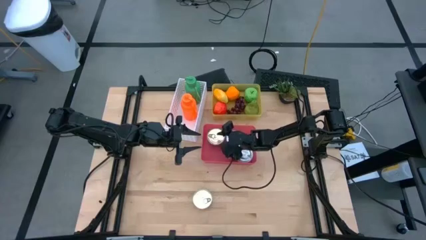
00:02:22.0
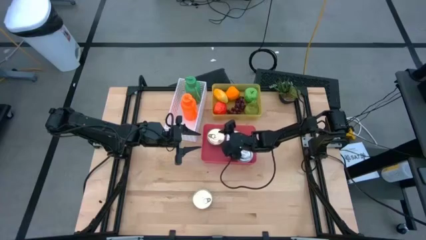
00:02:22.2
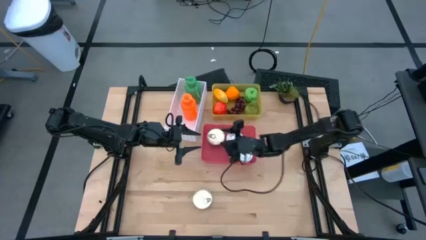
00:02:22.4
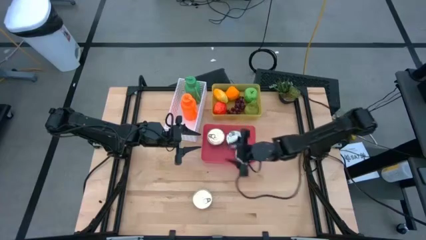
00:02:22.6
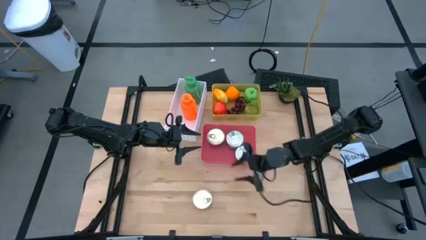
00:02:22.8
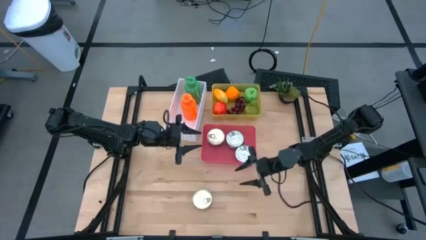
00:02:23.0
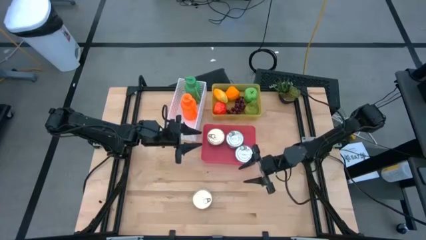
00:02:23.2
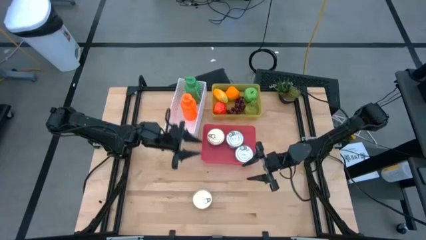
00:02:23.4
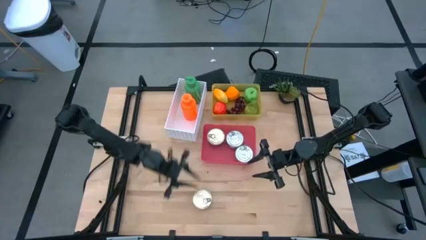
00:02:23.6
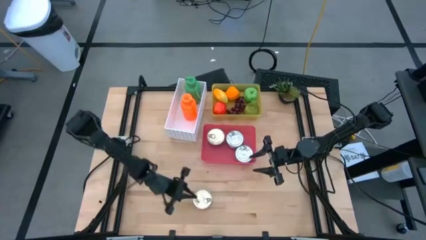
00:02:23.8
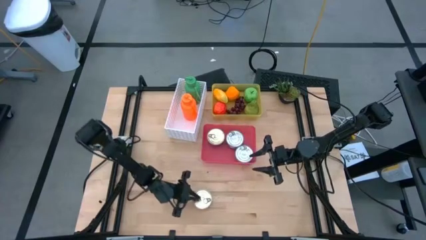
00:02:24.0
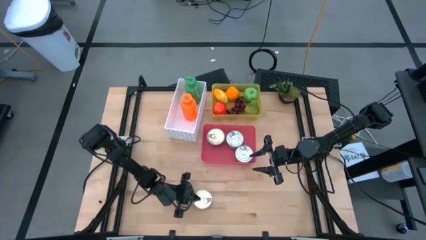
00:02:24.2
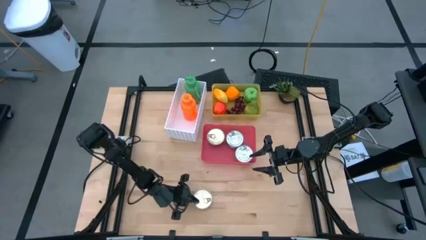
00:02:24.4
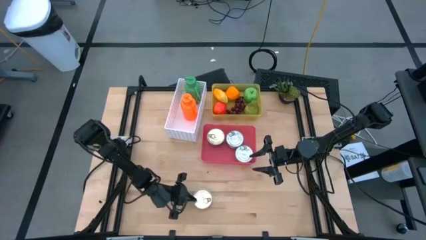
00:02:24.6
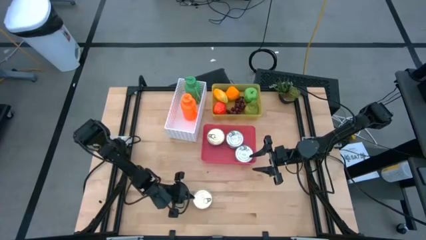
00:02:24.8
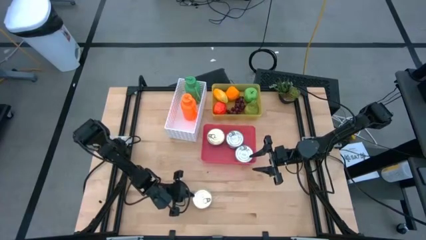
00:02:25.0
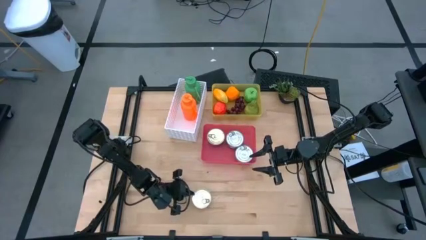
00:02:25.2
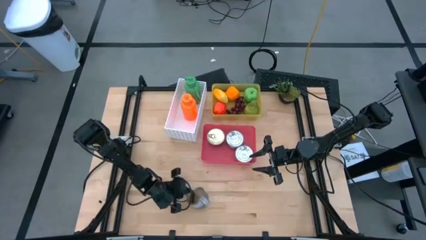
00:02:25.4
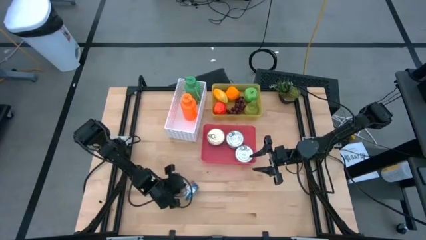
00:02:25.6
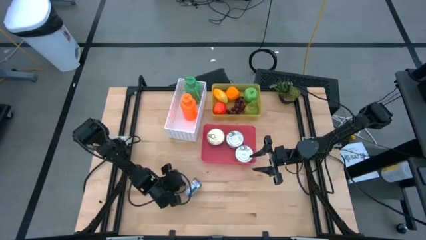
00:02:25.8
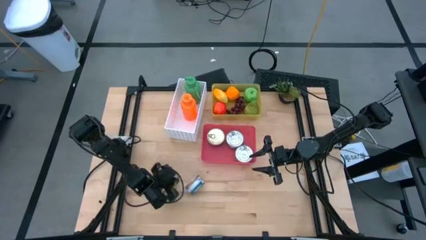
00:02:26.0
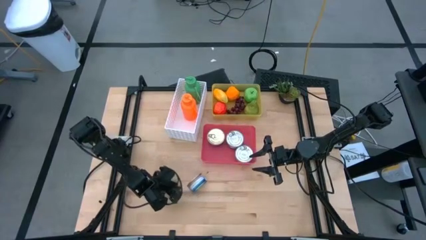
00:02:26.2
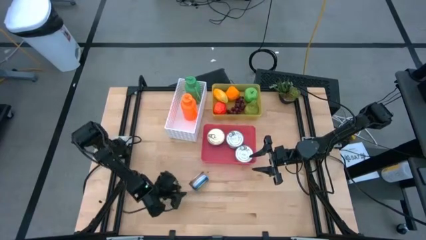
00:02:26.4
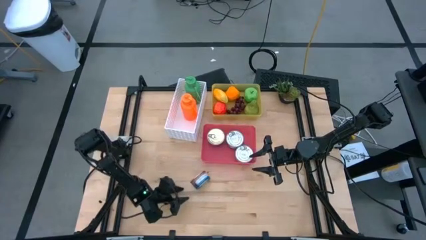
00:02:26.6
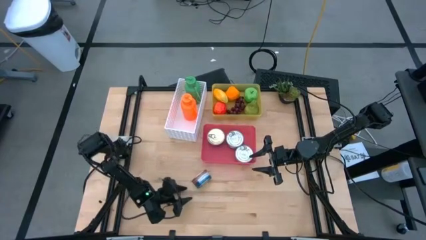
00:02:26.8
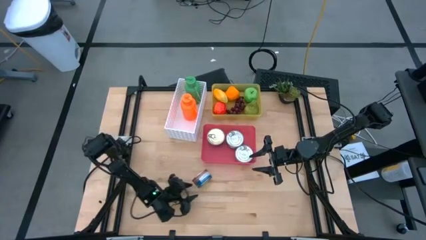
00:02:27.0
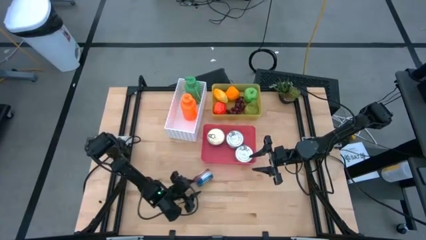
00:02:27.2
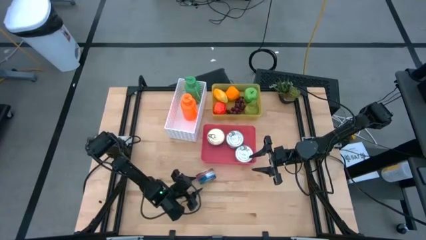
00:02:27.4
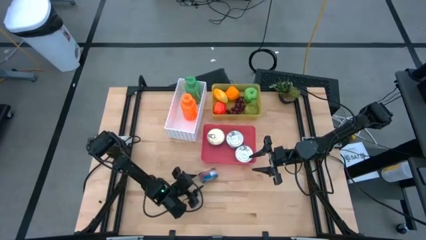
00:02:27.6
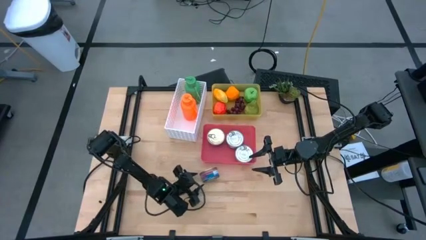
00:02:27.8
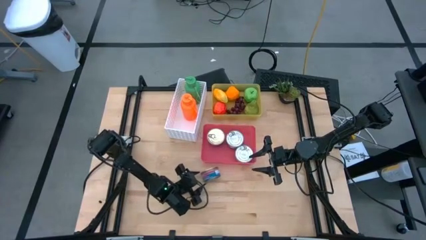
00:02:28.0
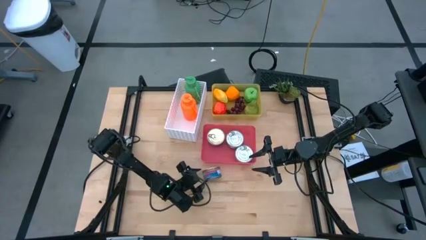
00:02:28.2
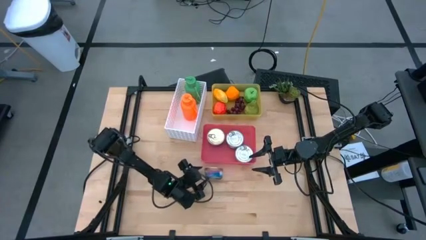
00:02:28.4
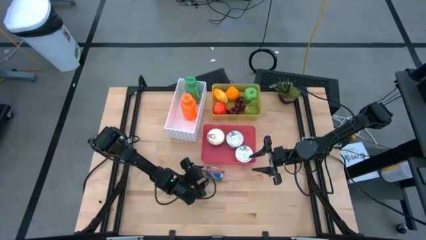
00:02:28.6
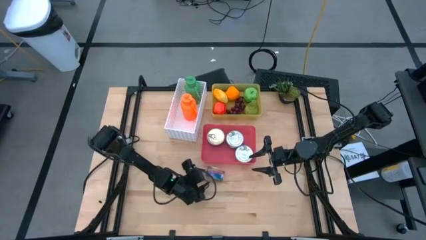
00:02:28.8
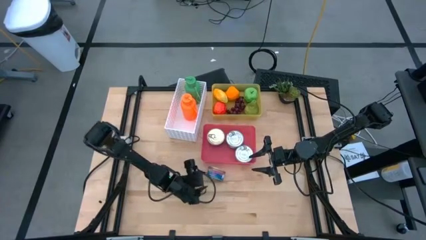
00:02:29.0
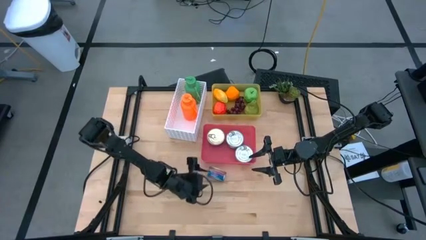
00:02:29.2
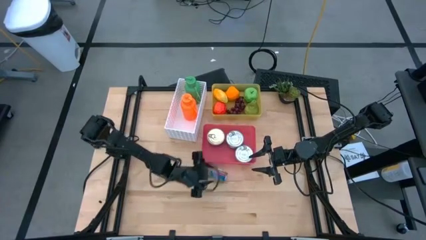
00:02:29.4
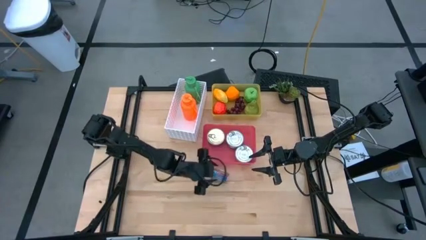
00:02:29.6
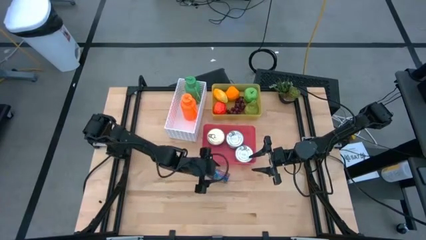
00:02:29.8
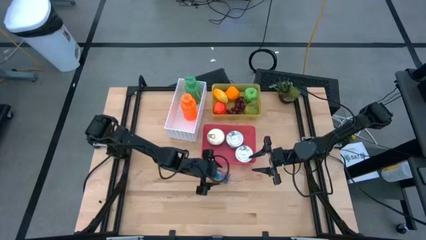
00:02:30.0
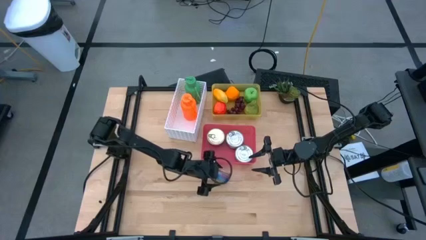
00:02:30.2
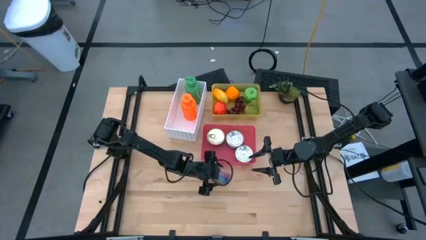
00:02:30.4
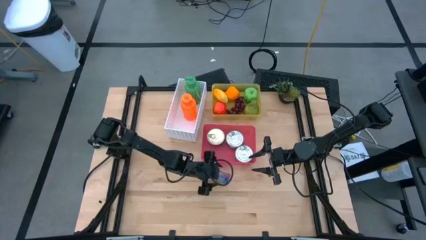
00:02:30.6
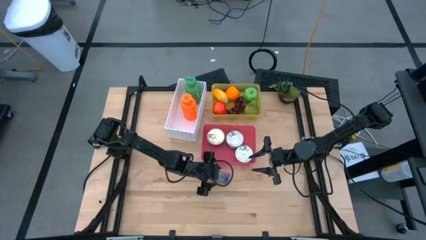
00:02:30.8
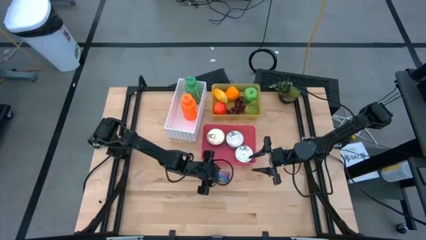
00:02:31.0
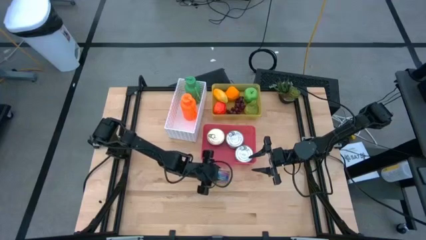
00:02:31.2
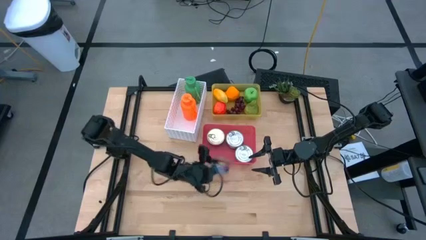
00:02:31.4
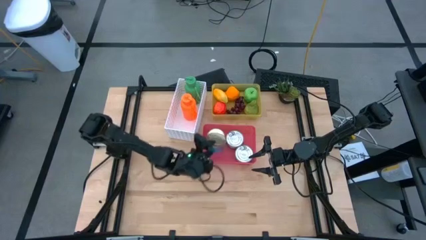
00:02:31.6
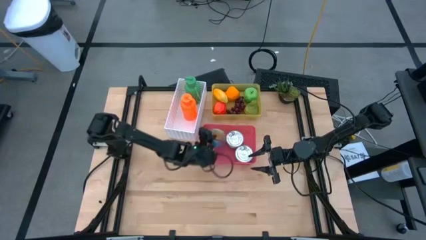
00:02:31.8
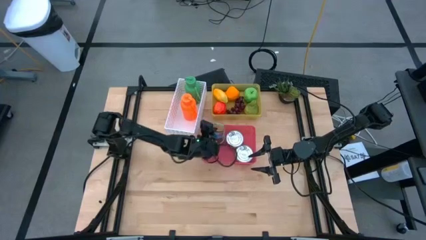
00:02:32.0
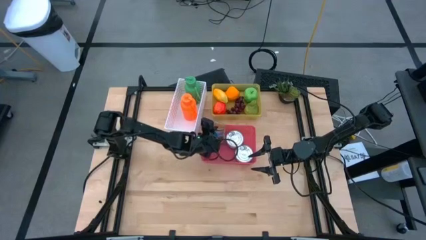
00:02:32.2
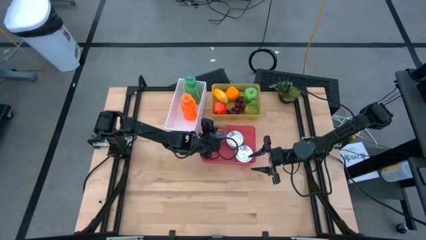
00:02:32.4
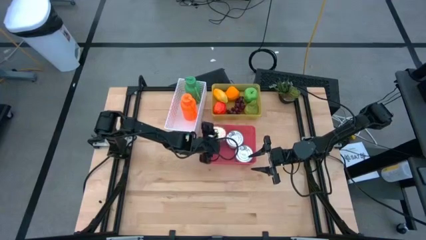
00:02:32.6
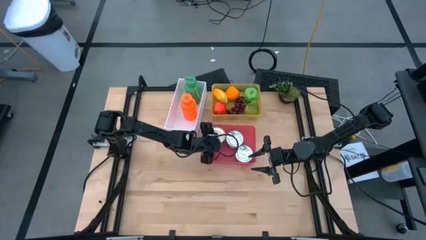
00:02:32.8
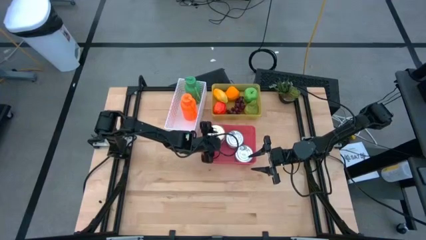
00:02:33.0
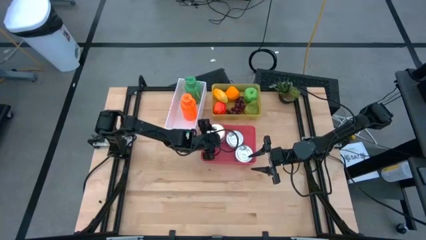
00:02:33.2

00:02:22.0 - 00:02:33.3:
Task: Pick & Place Food Item
Put the blue and pink tuna can into the red bin

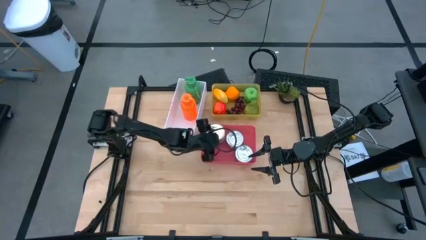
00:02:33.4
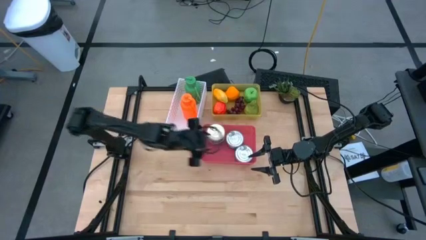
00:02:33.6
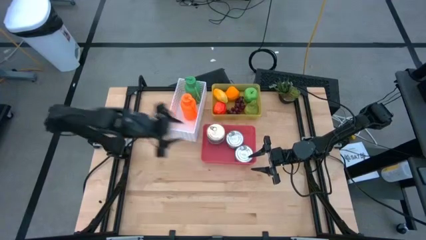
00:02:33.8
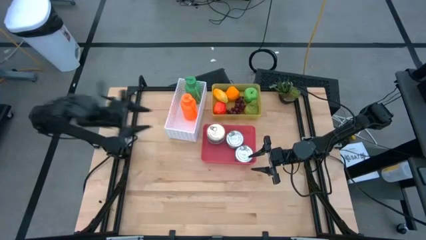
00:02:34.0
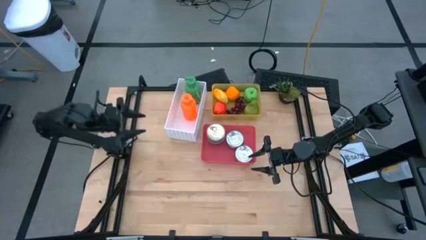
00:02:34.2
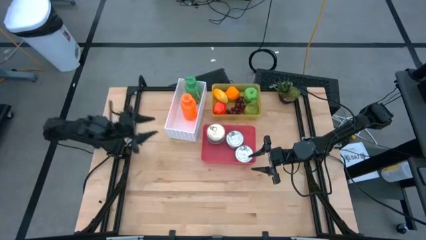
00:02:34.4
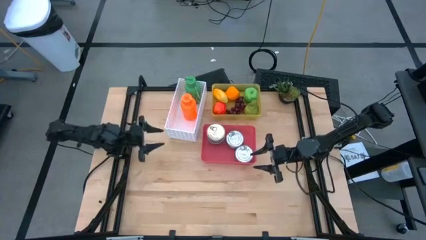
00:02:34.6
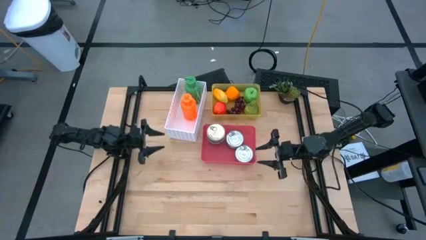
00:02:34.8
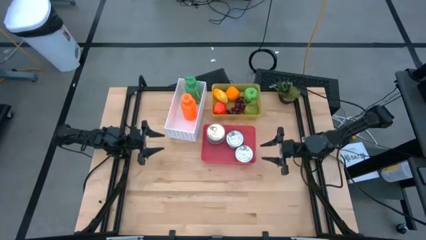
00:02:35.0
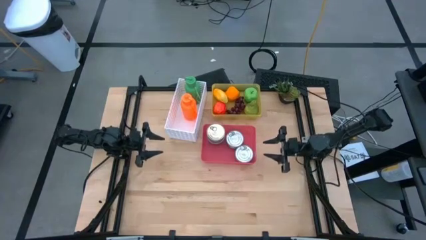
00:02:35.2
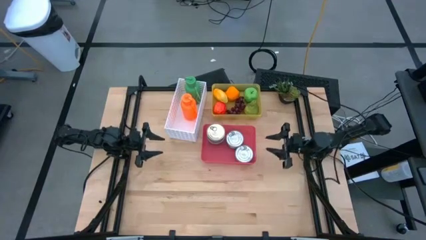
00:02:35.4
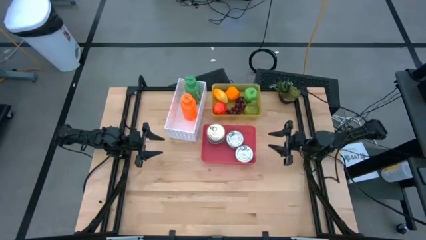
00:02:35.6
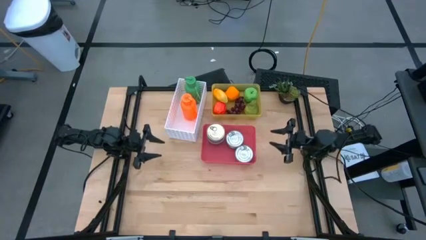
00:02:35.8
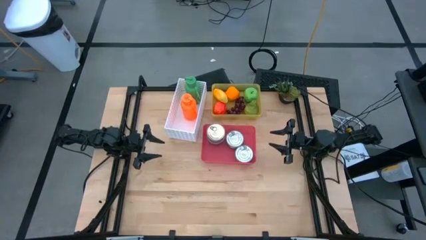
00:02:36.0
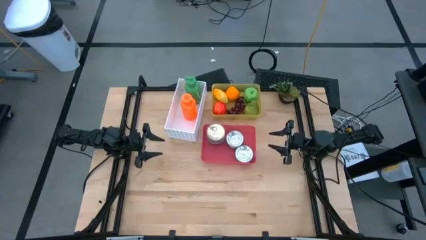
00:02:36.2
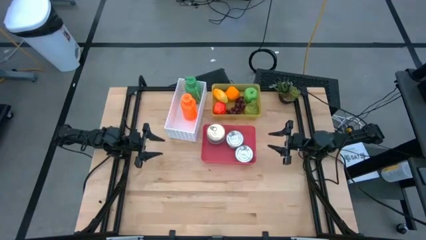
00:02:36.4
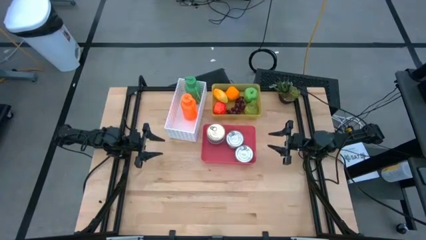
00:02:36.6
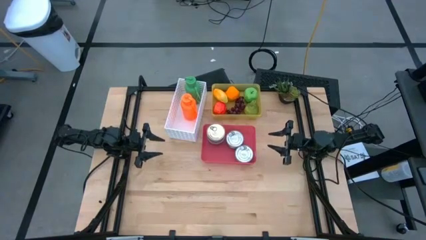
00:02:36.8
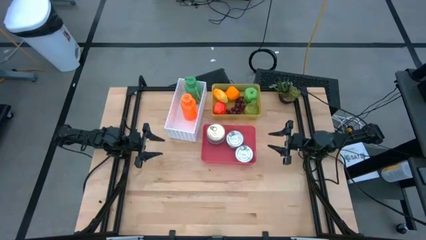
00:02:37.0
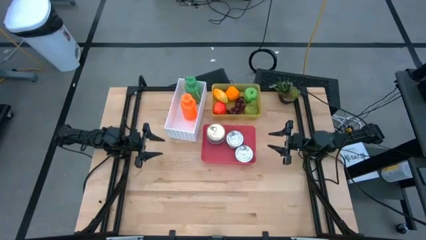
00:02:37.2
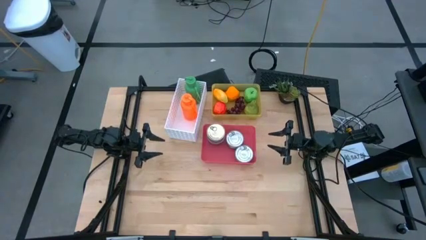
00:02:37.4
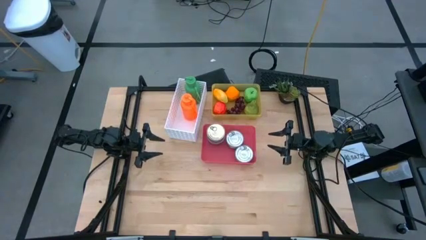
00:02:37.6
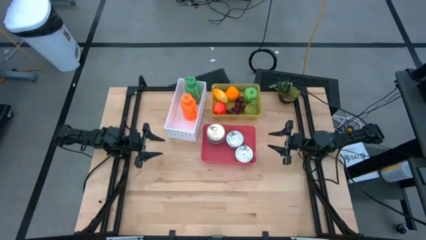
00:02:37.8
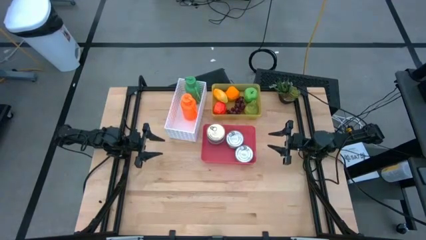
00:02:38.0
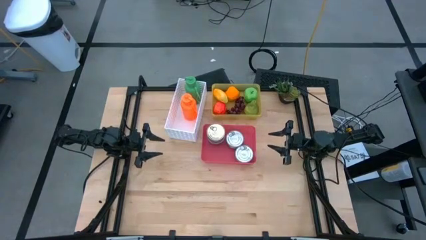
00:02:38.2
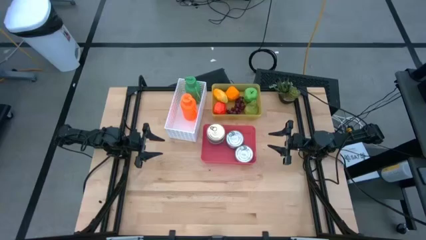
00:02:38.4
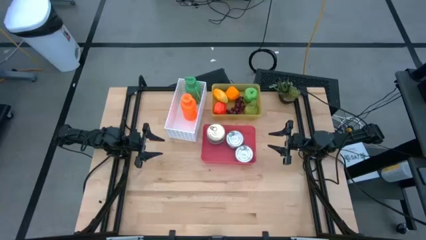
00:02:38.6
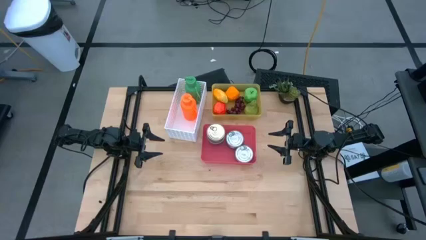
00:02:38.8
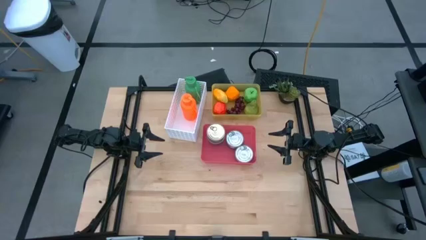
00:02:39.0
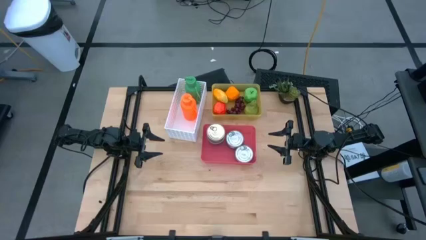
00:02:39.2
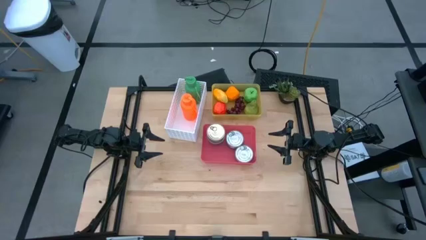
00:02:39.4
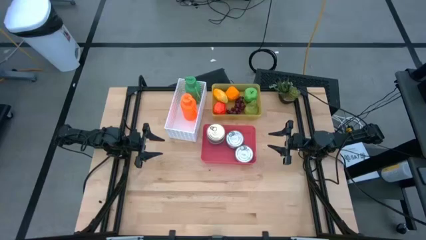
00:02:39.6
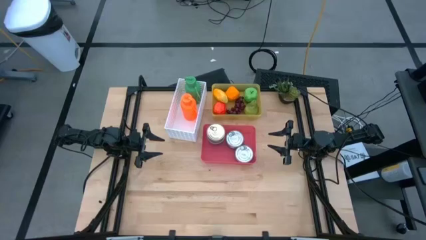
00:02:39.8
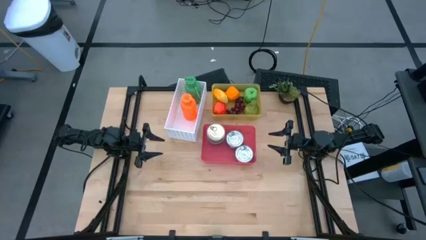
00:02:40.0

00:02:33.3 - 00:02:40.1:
Return to home position
